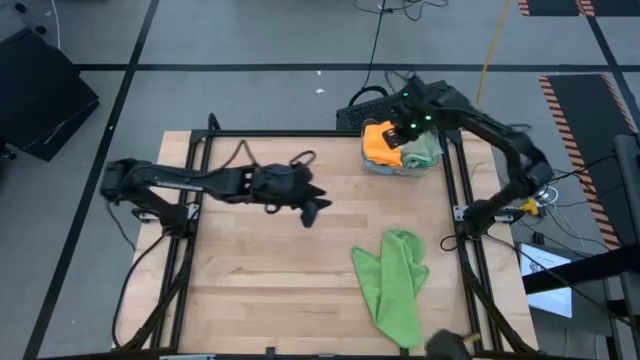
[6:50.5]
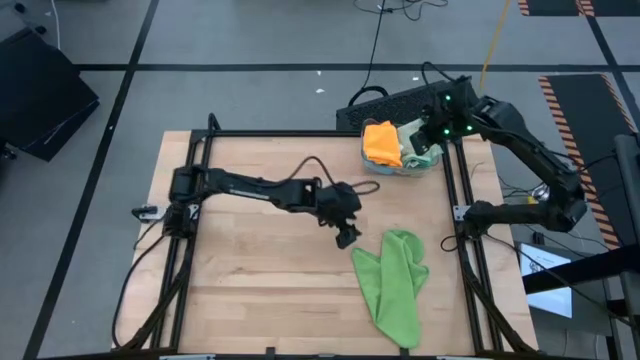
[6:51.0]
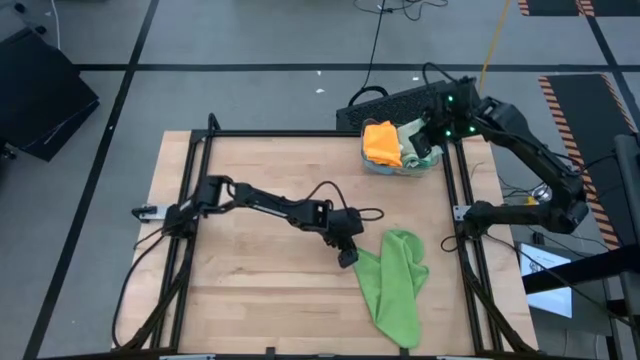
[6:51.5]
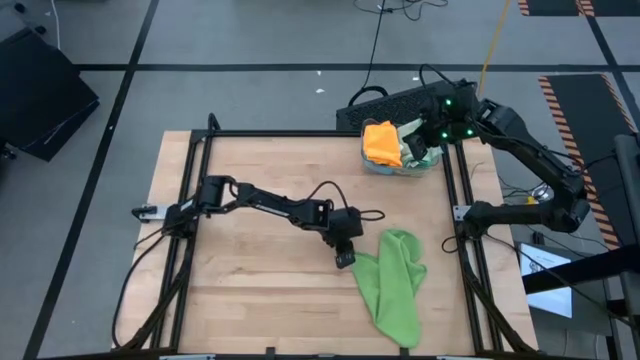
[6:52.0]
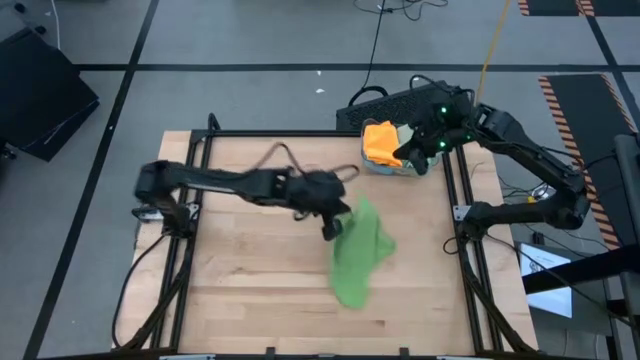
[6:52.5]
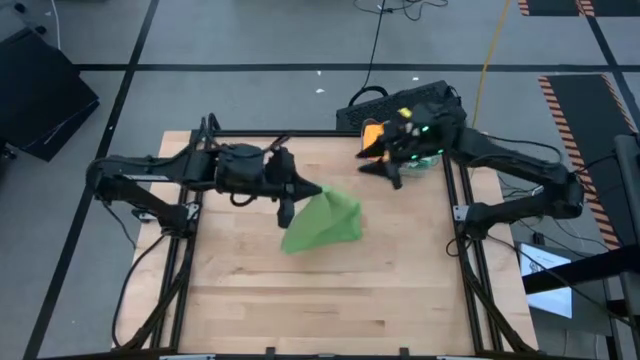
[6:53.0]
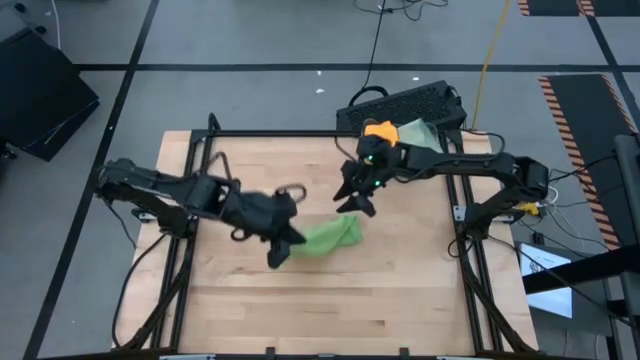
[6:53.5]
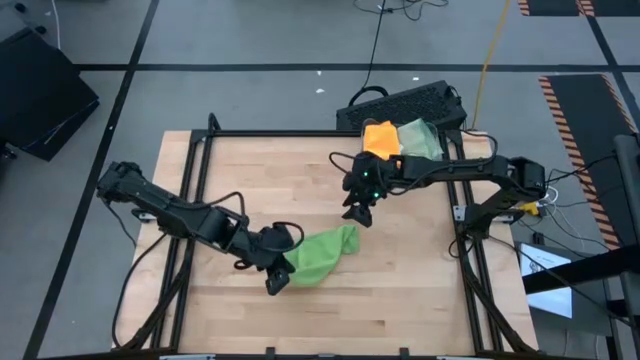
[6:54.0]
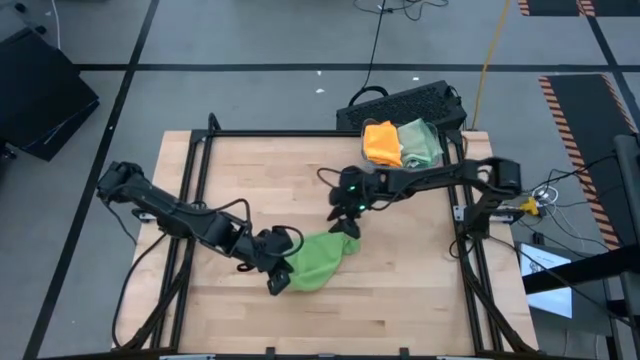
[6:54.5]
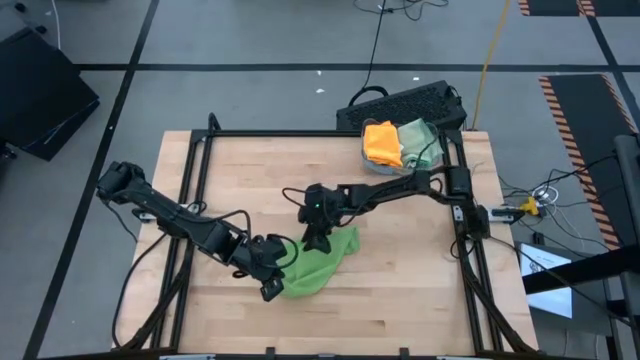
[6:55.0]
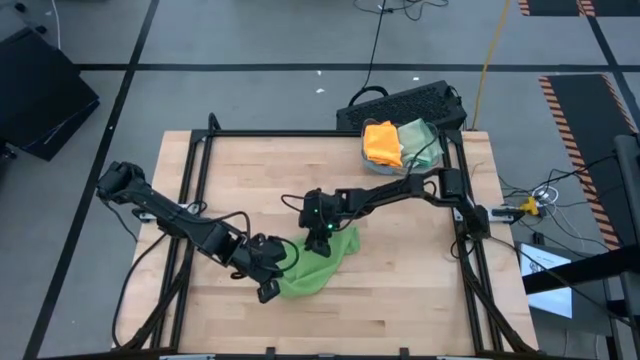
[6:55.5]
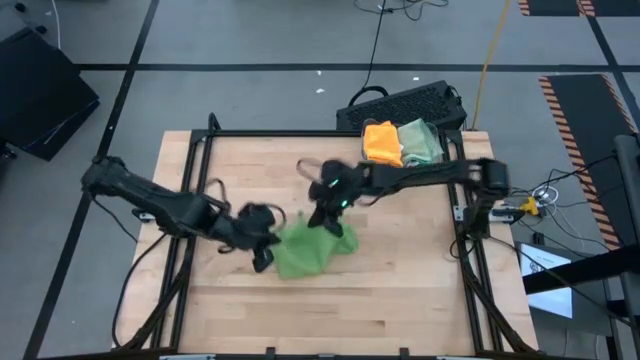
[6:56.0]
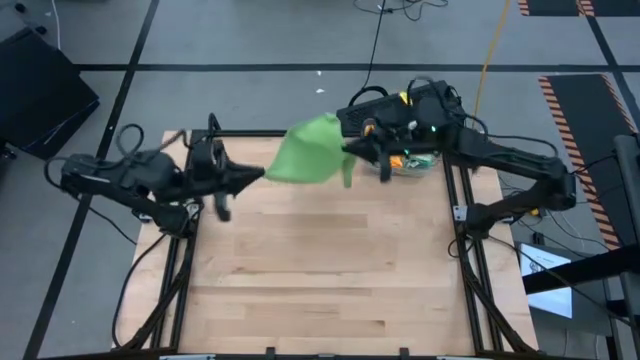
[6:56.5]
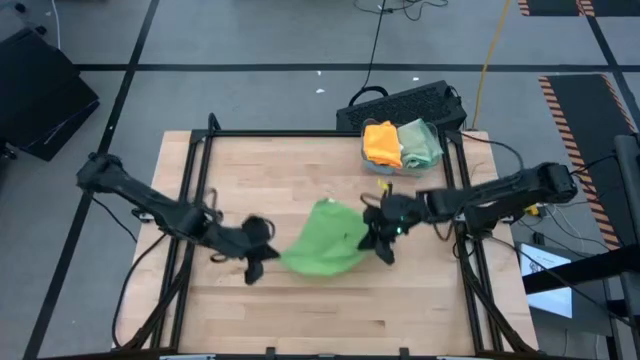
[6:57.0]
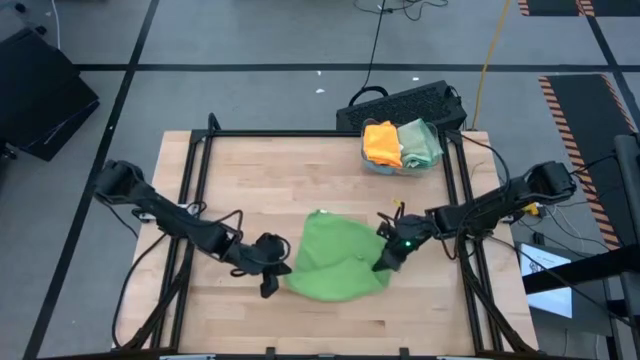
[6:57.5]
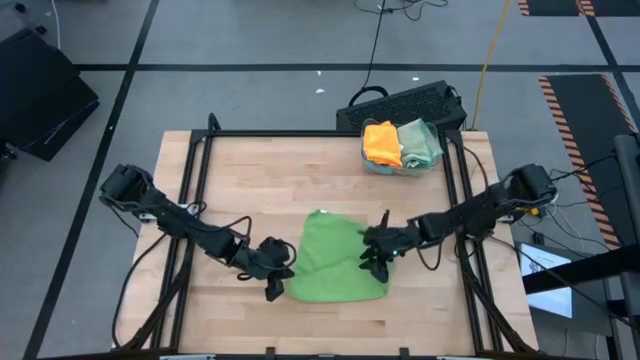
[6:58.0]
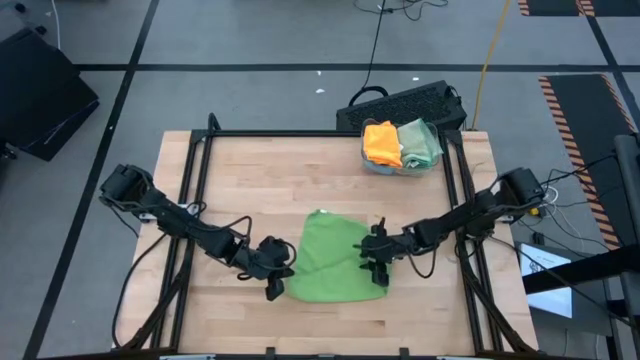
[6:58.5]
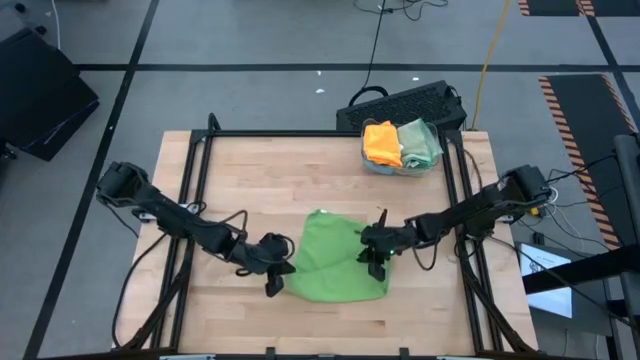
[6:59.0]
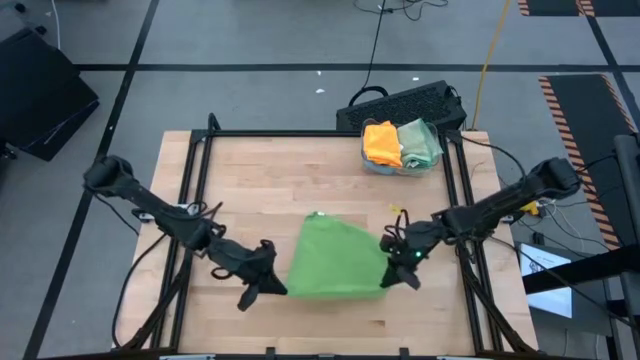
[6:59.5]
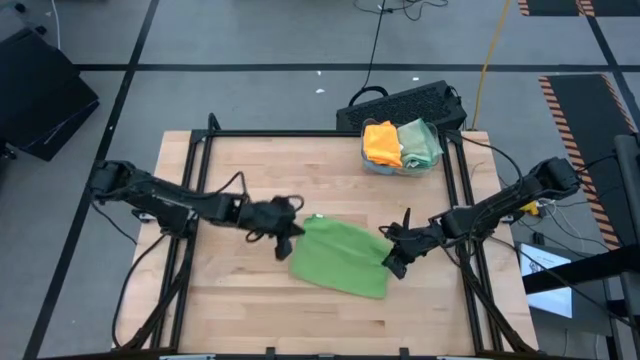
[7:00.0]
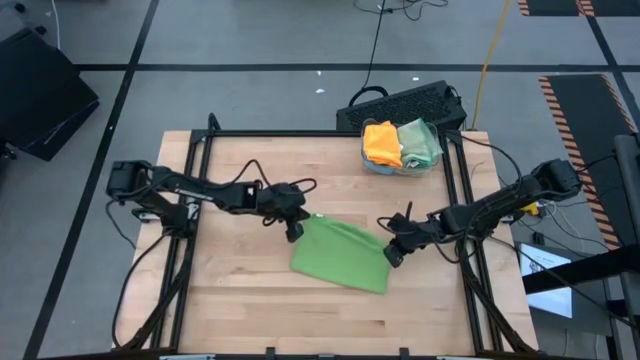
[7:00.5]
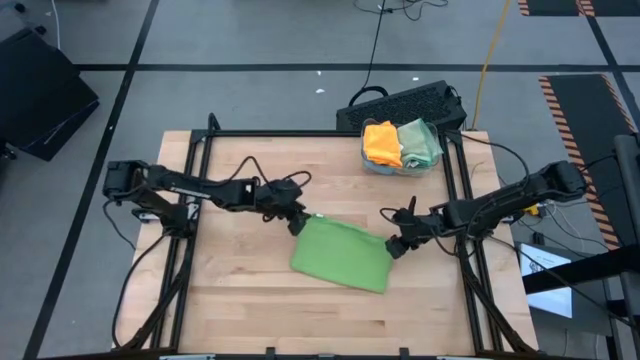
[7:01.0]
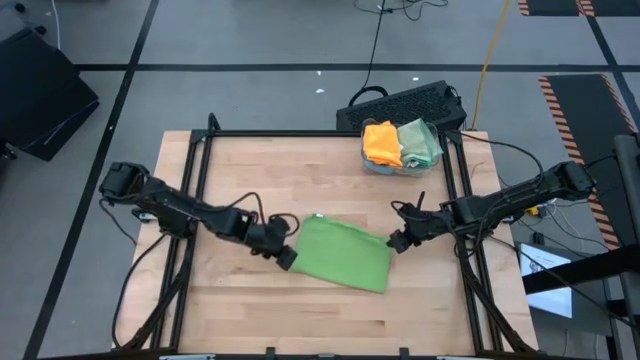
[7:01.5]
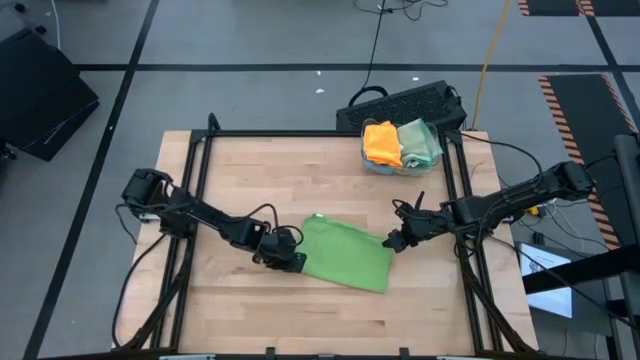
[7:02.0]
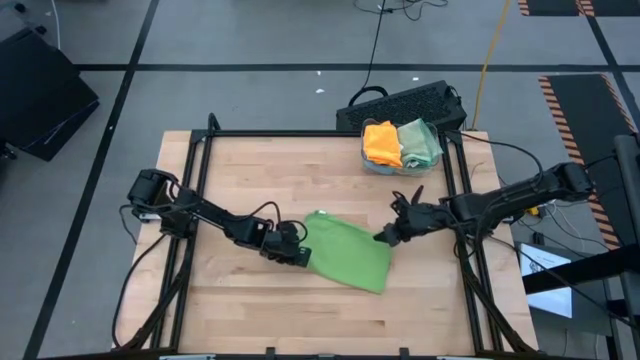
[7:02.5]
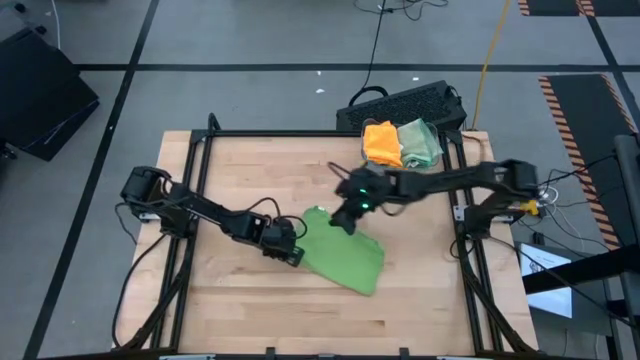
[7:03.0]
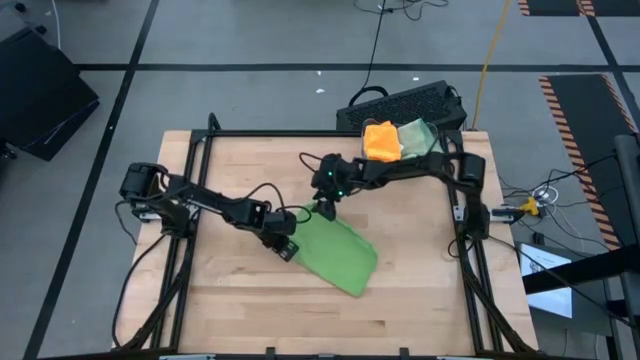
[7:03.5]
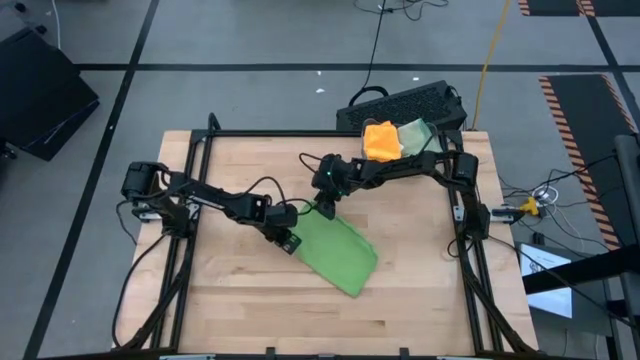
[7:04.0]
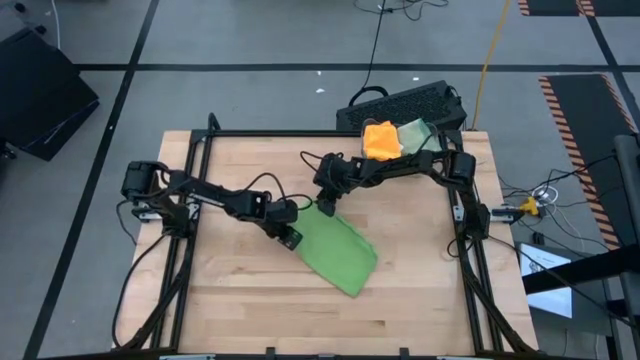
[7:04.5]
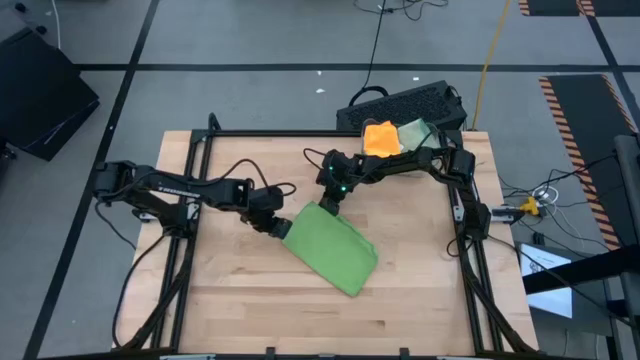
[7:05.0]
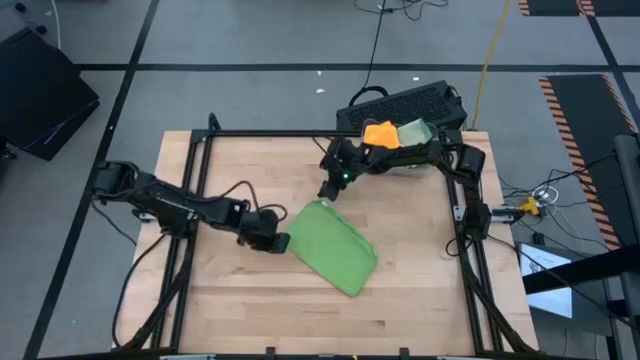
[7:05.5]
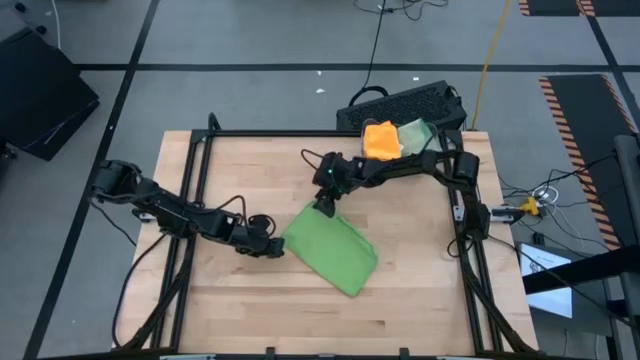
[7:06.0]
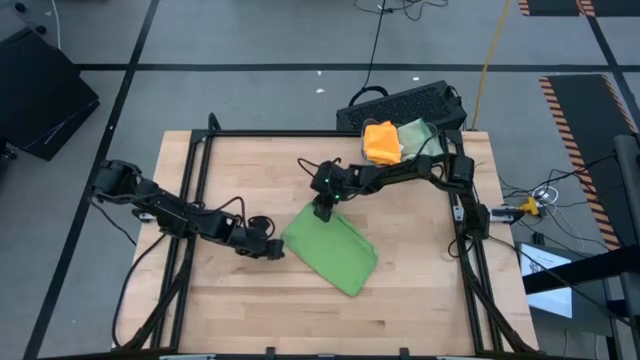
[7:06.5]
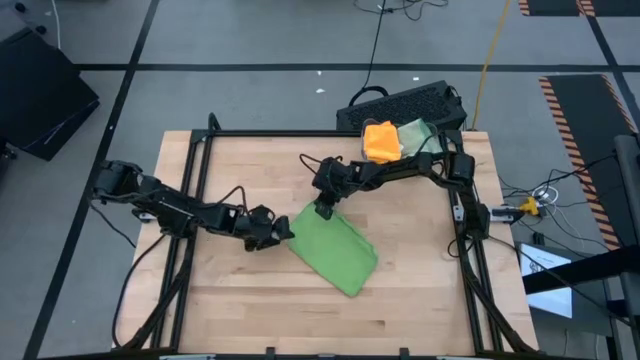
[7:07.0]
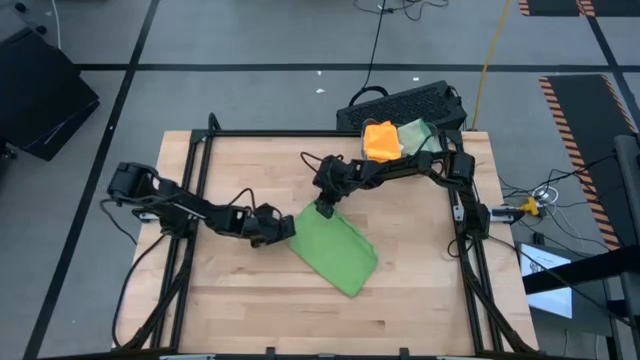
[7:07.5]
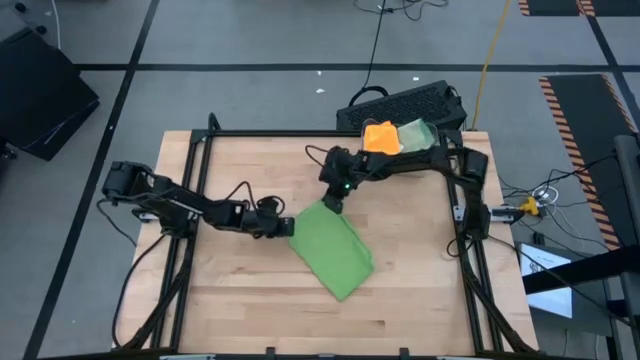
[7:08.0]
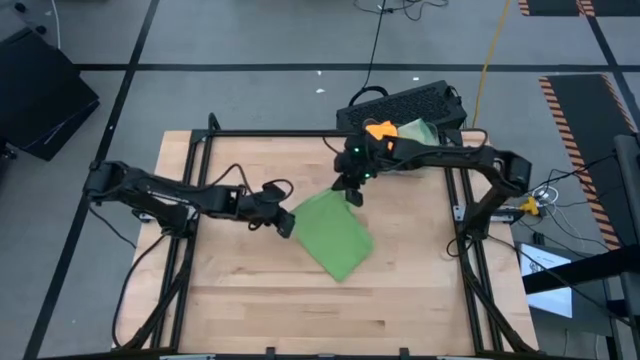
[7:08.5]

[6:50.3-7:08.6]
Task: Fold microfiber towels
Fold the green microfiber towel
